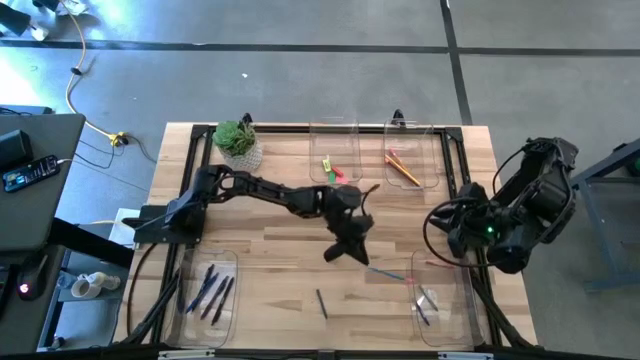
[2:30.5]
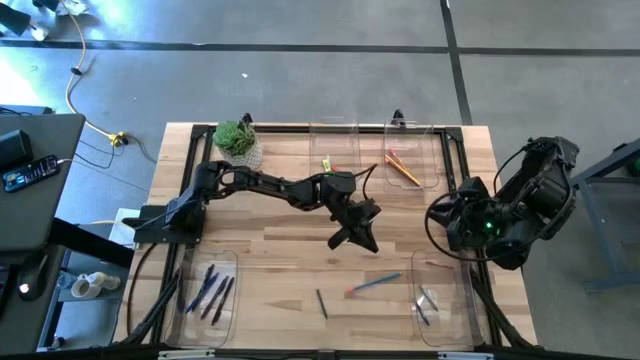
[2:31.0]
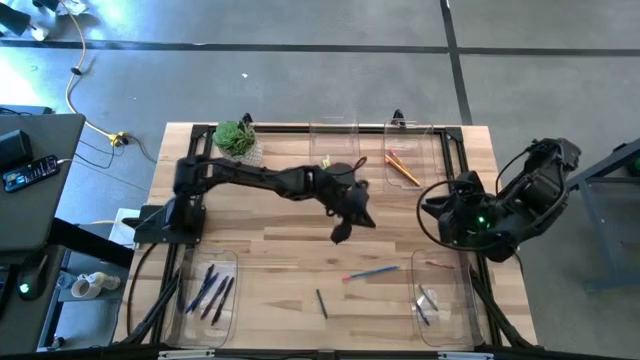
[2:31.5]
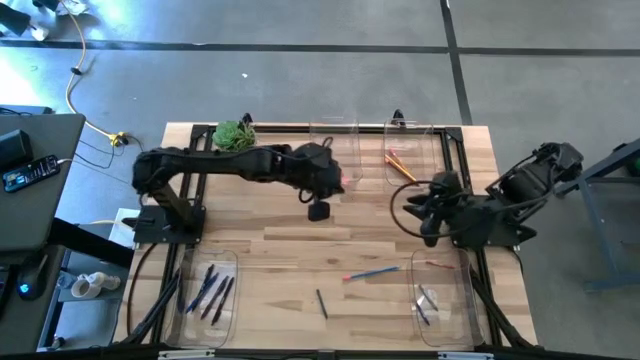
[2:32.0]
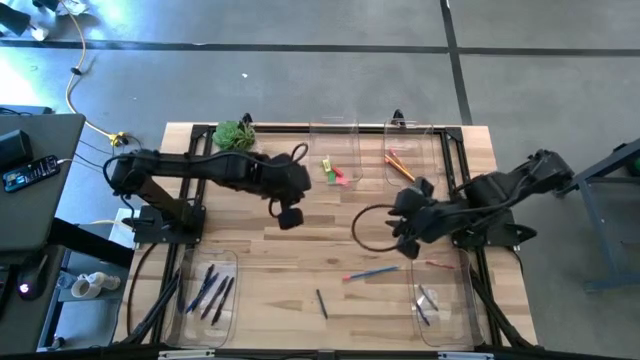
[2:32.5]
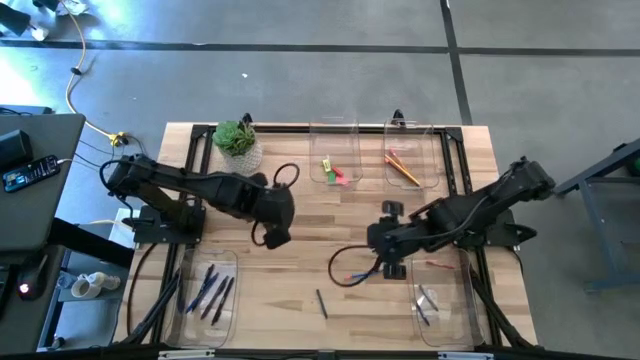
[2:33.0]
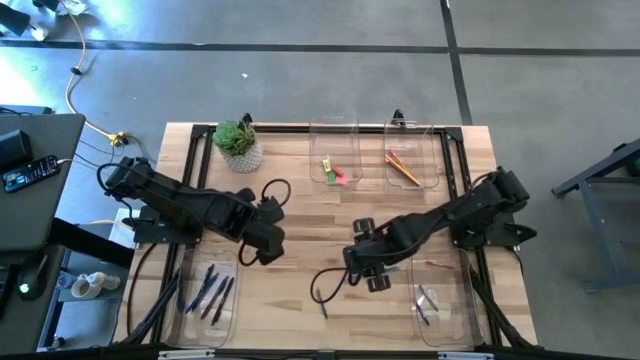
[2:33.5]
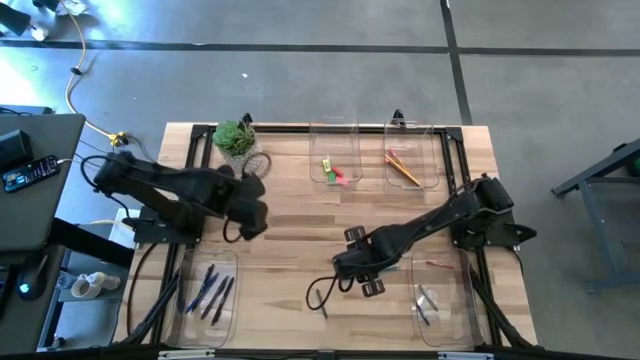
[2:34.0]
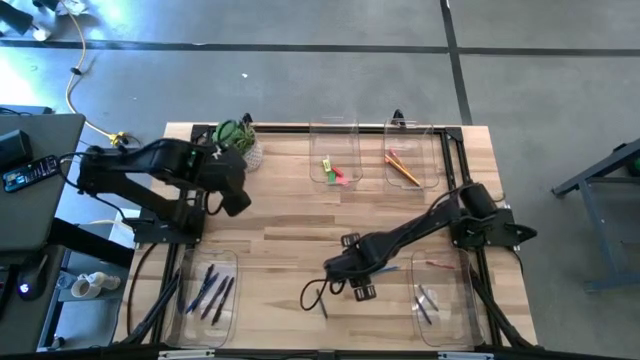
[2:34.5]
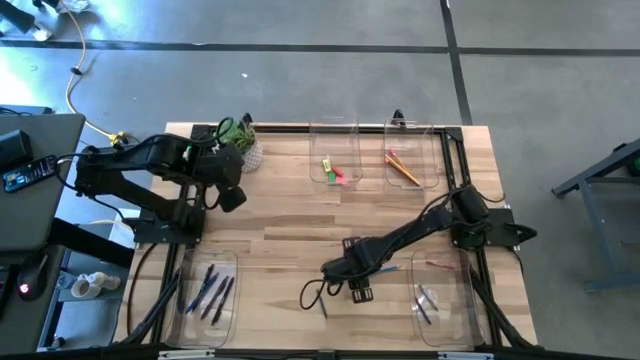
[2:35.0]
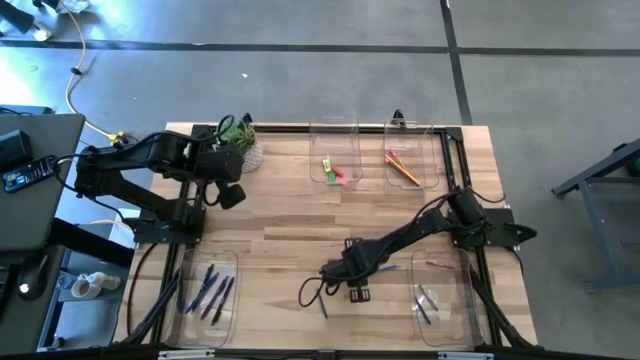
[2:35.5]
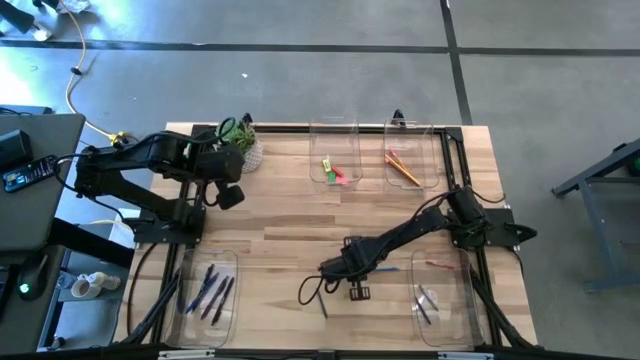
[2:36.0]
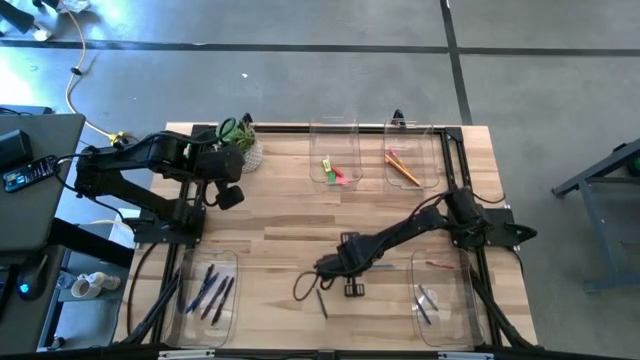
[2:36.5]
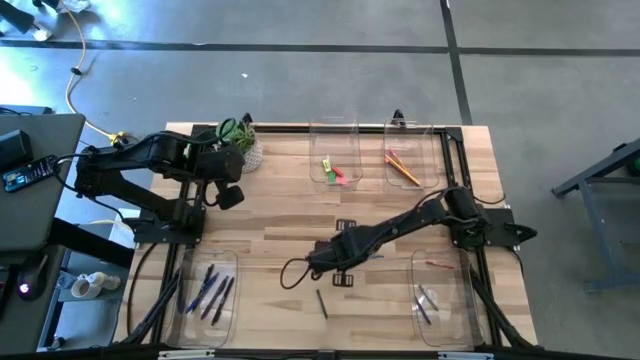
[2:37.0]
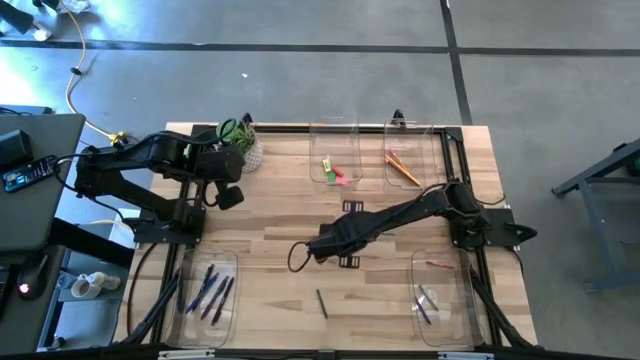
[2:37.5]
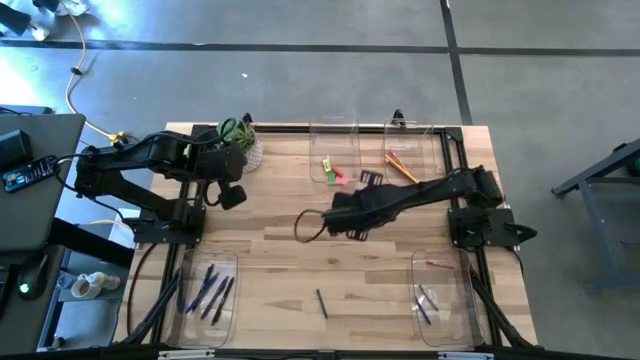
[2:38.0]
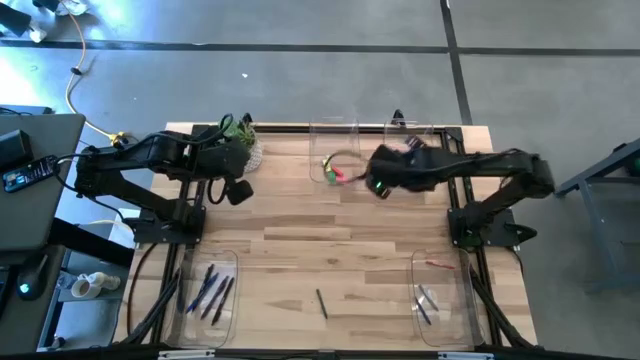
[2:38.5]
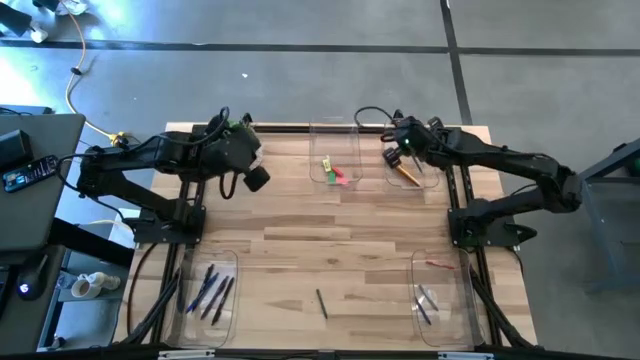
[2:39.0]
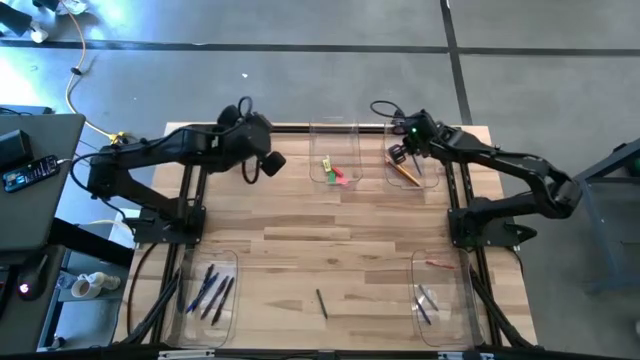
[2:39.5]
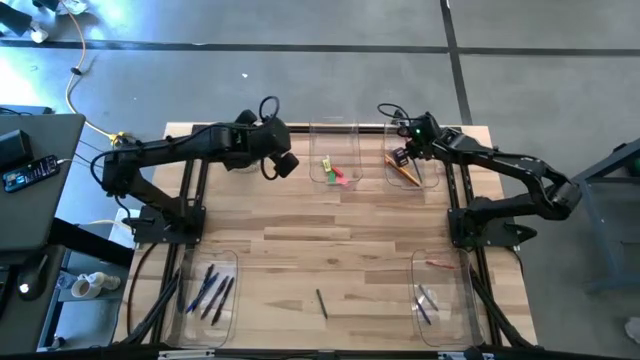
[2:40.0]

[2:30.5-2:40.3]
Task: Sort crayons/erasers/pens/pencils in bins
Put the blue pencil into the top right transparent bin

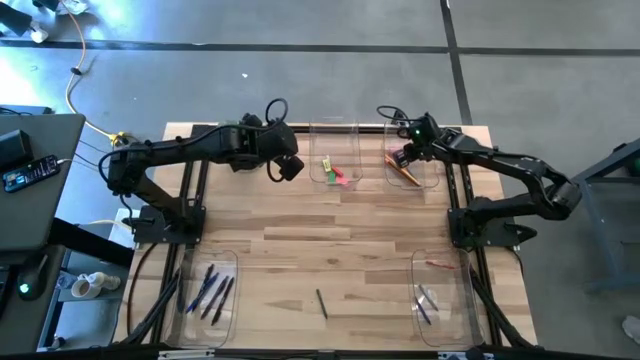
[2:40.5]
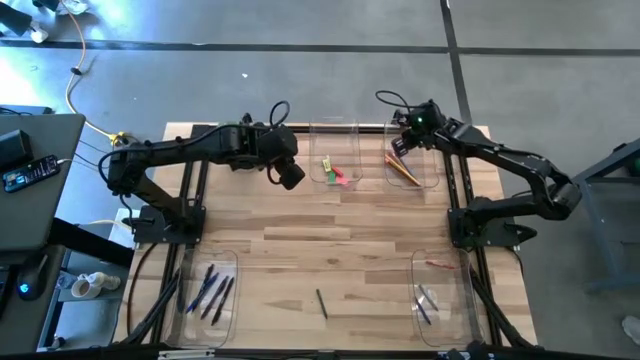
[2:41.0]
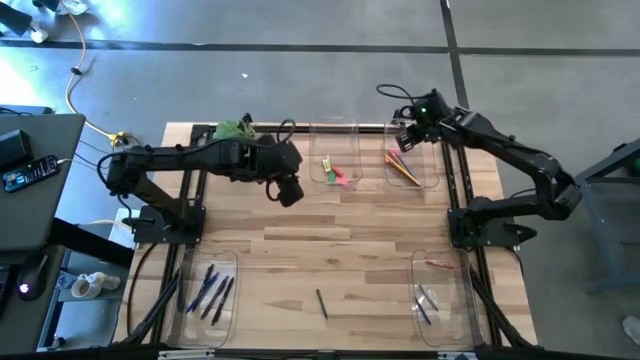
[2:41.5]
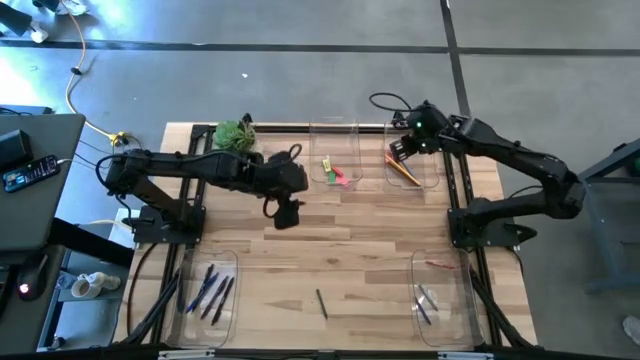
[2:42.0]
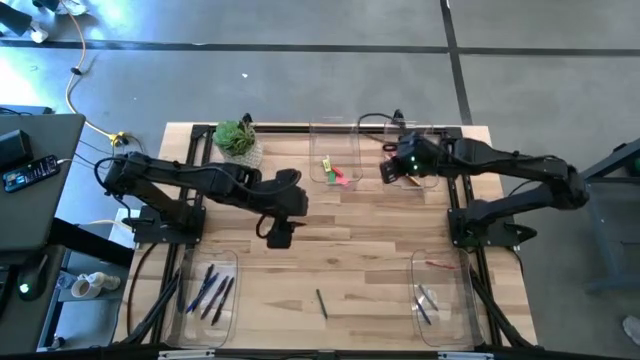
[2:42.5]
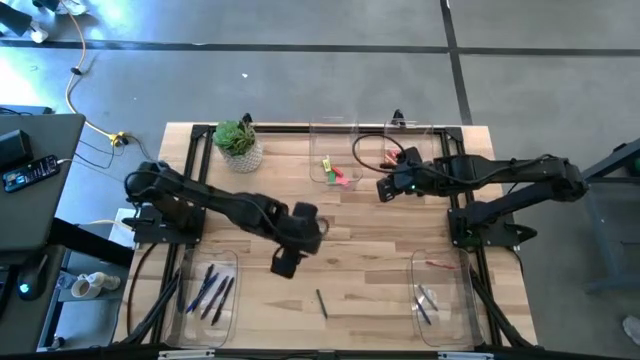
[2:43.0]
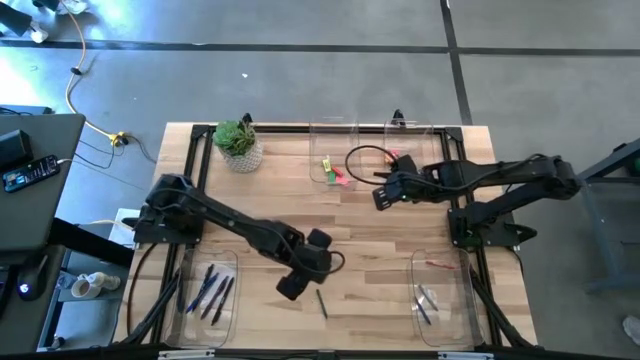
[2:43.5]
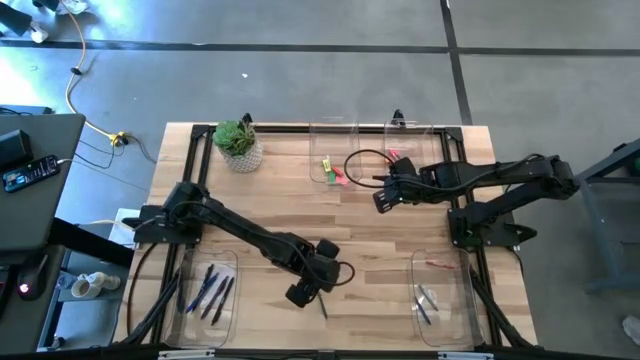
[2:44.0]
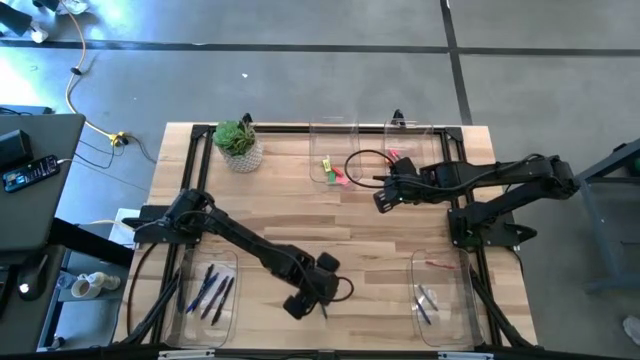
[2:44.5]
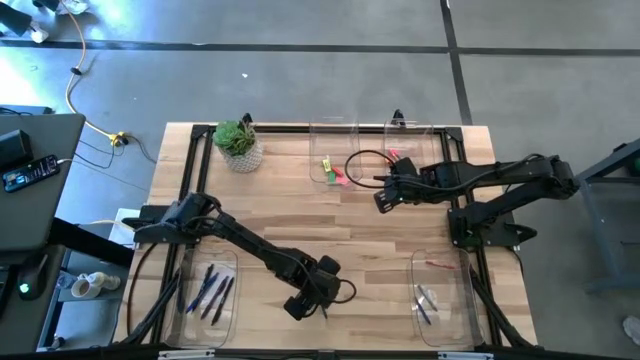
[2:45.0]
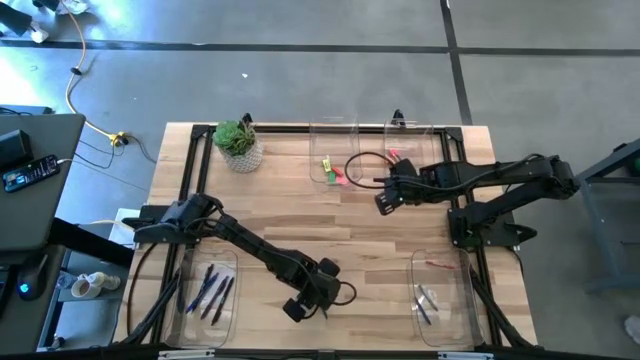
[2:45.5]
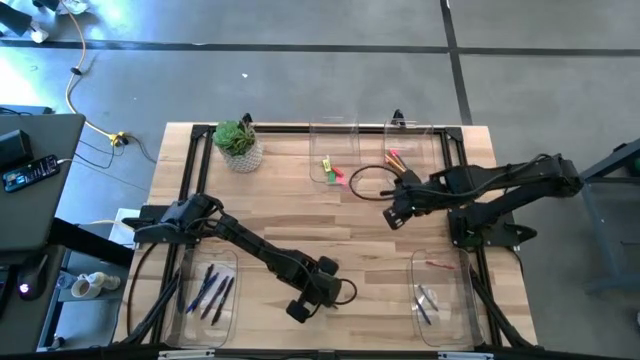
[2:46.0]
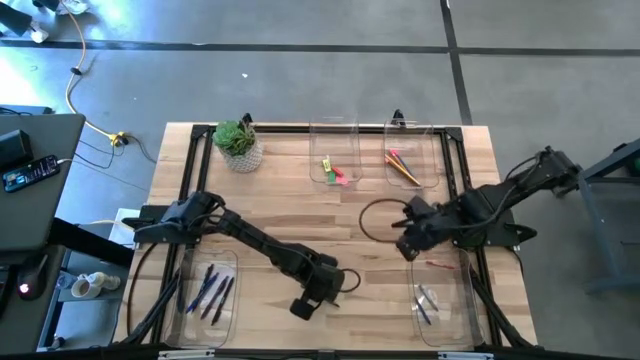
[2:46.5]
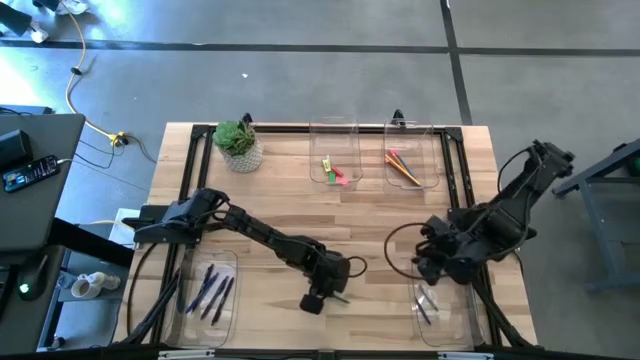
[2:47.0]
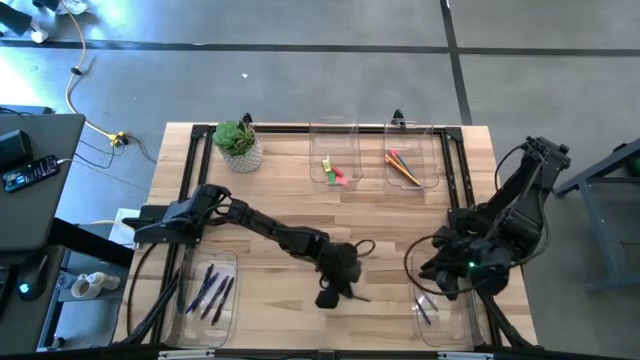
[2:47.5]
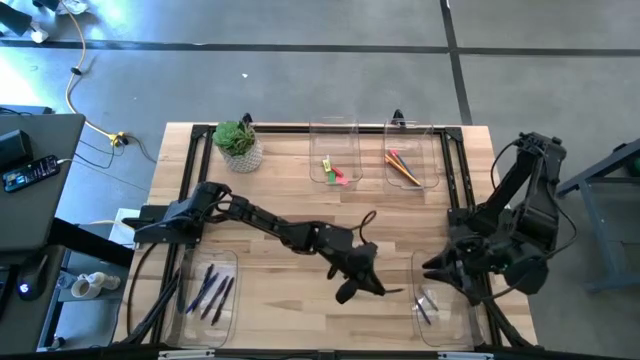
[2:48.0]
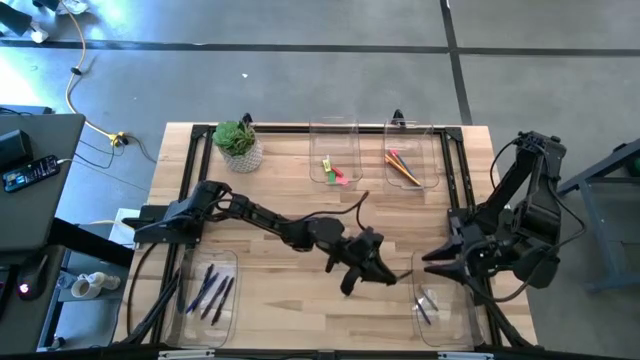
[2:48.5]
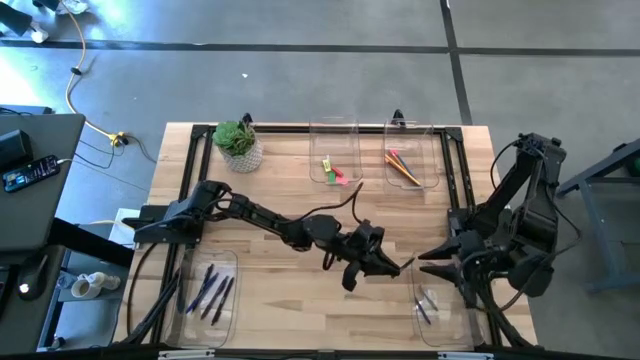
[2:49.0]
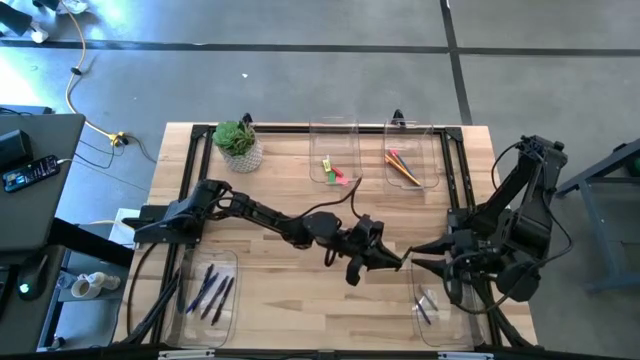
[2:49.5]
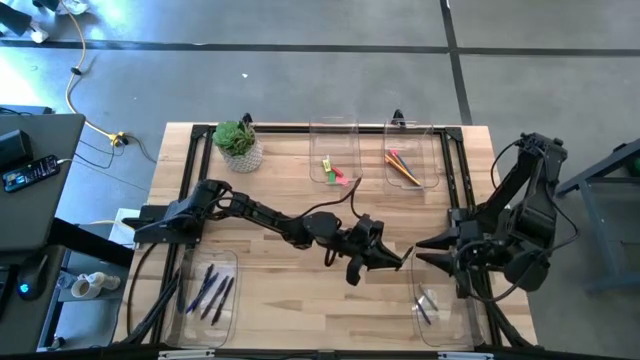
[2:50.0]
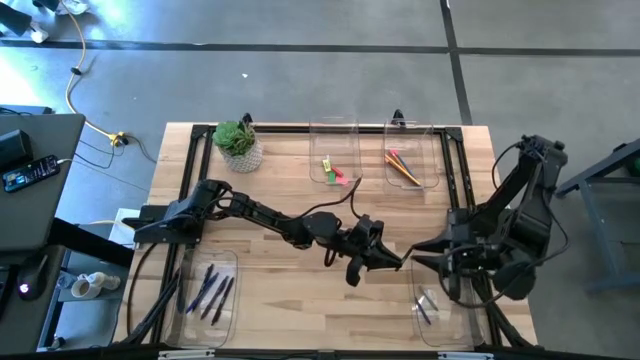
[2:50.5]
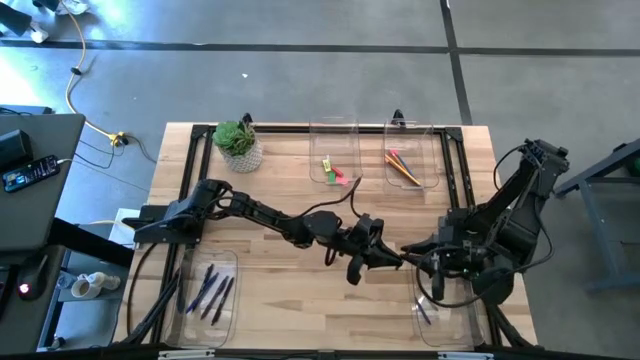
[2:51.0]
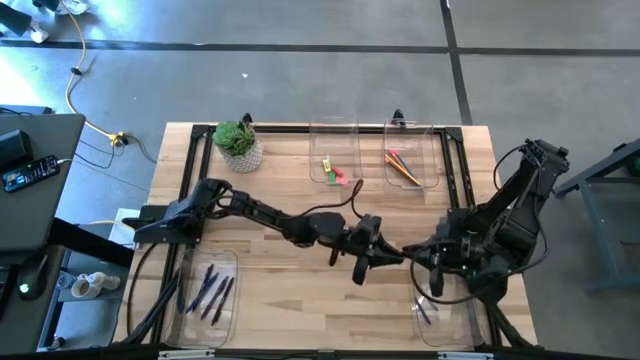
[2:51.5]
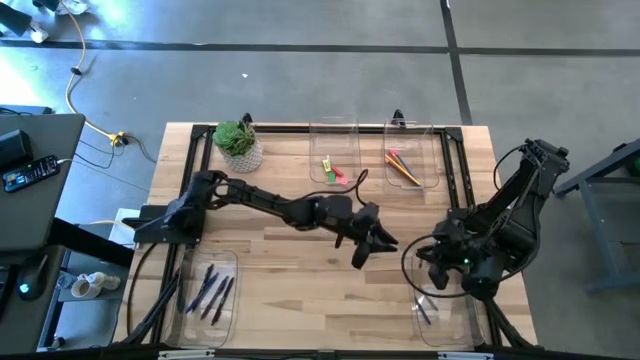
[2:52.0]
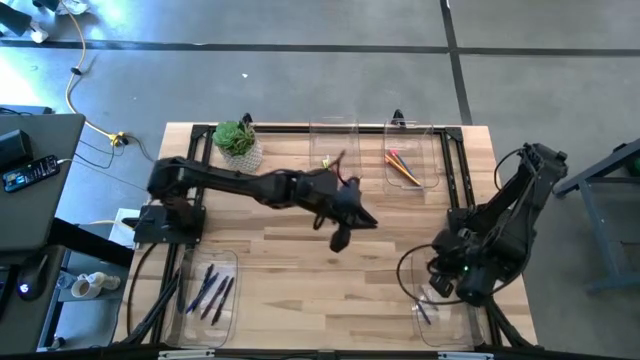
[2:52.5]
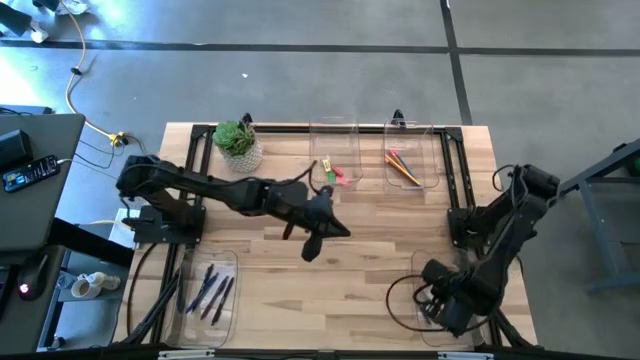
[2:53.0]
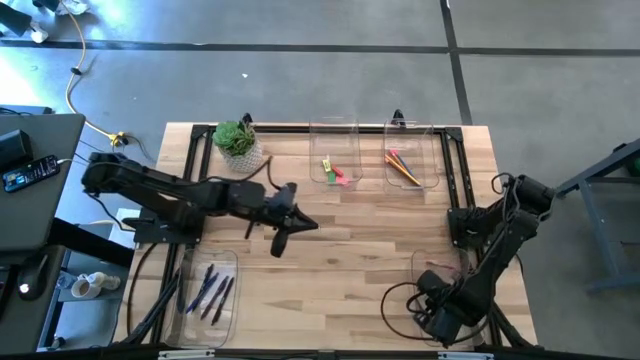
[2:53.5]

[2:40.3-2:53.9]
Put the green crayon into the bottom right transparent bin
